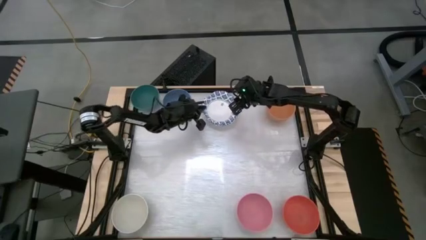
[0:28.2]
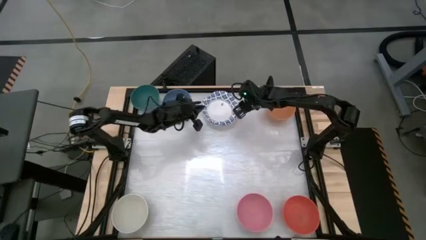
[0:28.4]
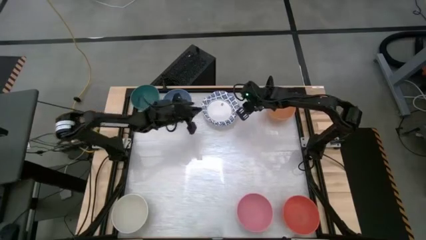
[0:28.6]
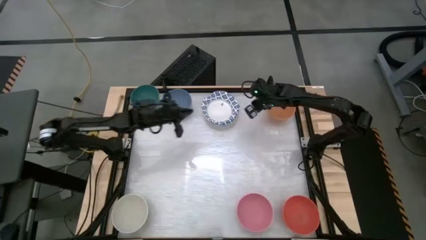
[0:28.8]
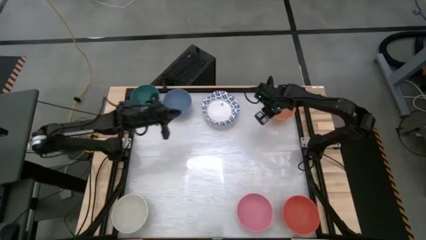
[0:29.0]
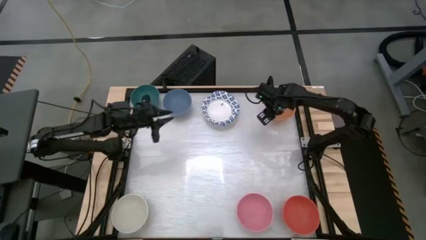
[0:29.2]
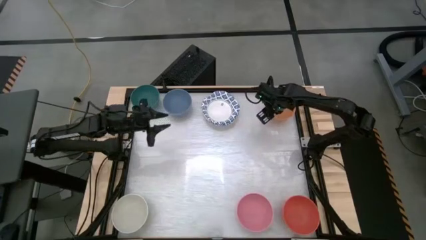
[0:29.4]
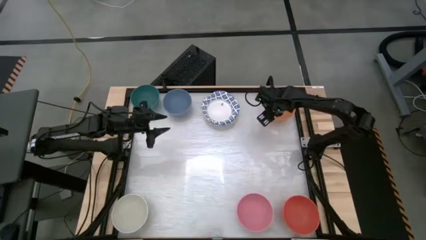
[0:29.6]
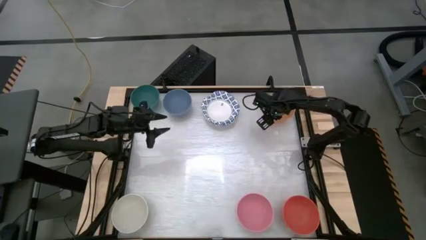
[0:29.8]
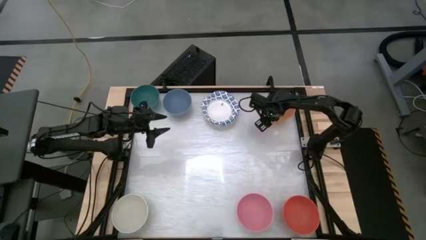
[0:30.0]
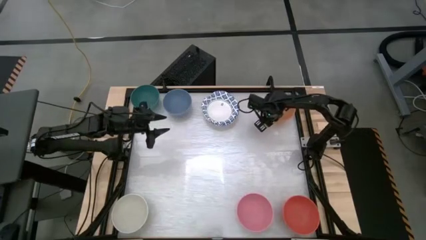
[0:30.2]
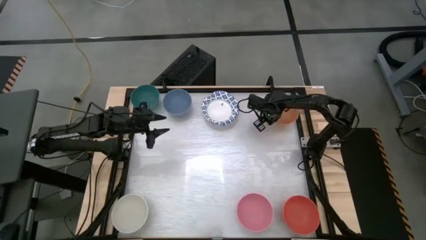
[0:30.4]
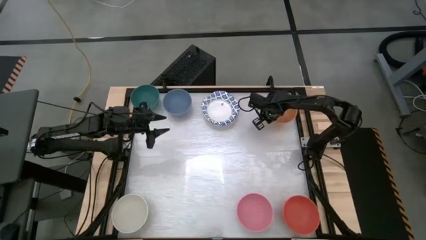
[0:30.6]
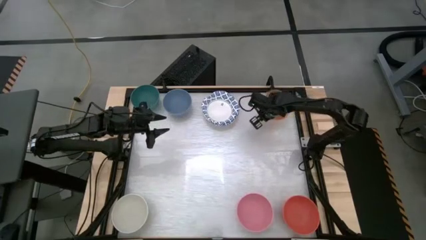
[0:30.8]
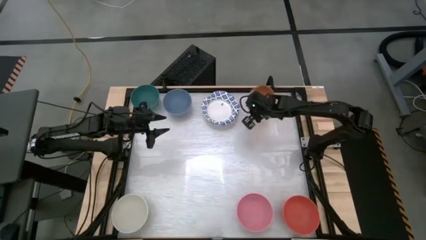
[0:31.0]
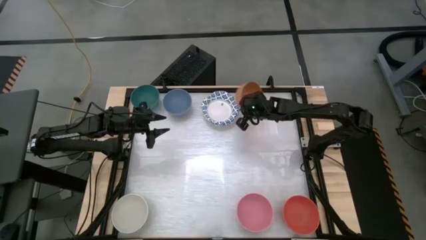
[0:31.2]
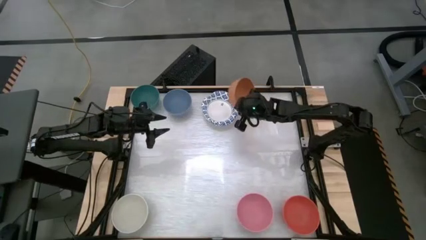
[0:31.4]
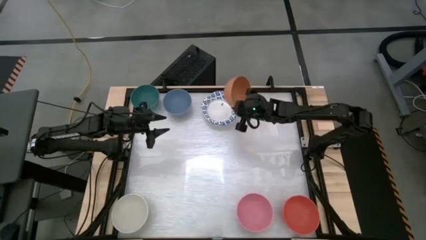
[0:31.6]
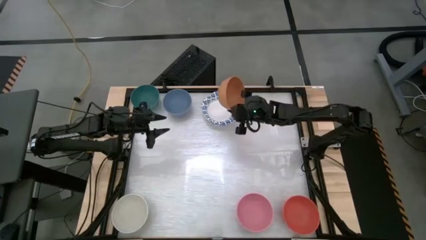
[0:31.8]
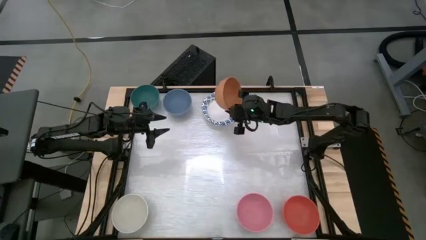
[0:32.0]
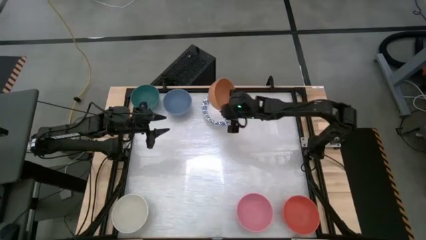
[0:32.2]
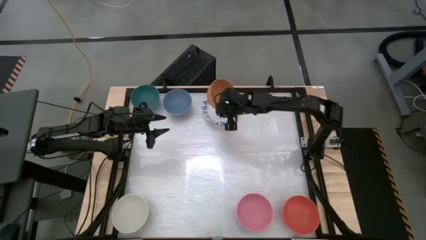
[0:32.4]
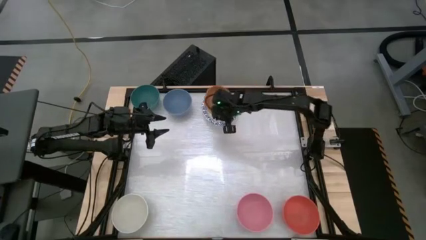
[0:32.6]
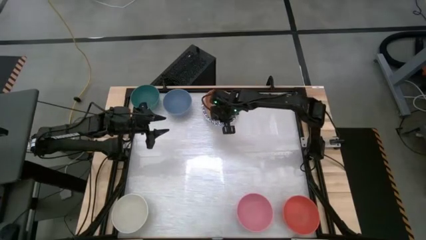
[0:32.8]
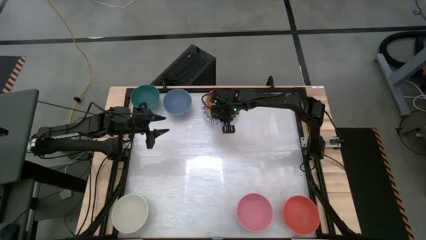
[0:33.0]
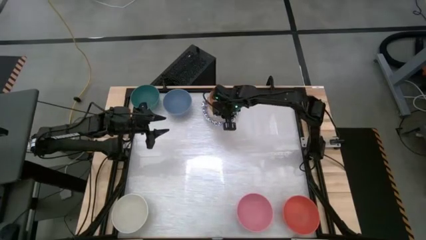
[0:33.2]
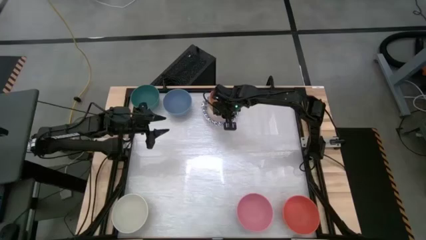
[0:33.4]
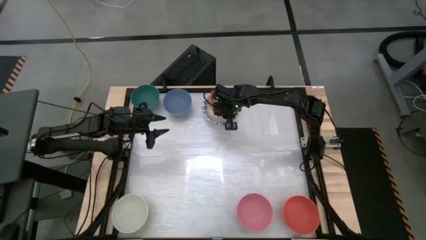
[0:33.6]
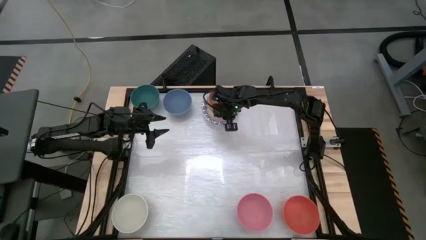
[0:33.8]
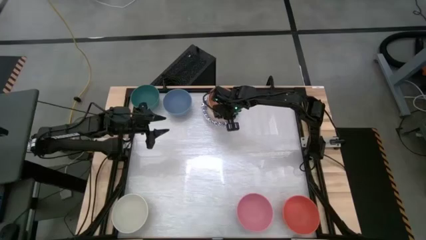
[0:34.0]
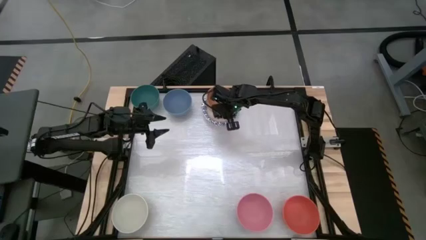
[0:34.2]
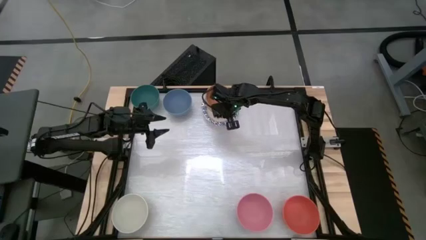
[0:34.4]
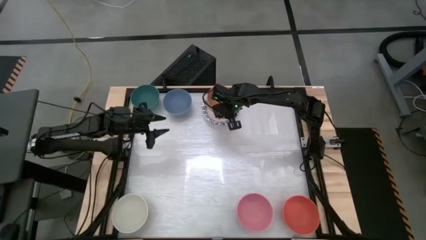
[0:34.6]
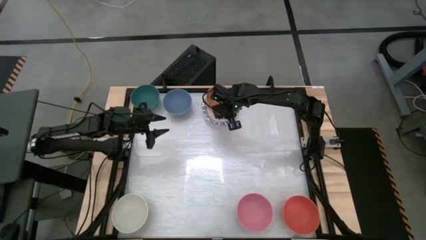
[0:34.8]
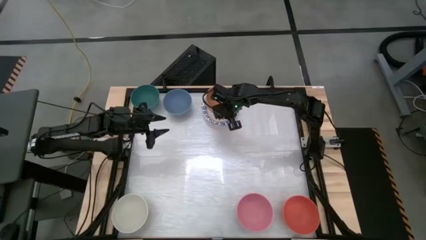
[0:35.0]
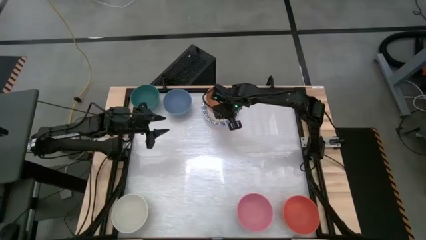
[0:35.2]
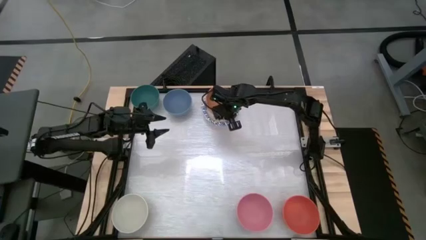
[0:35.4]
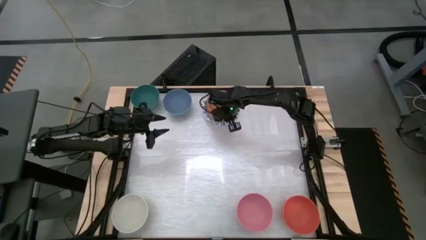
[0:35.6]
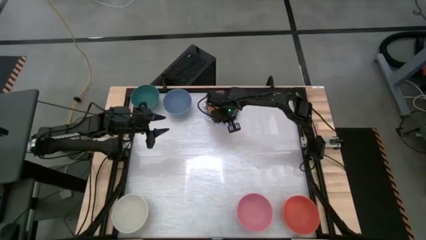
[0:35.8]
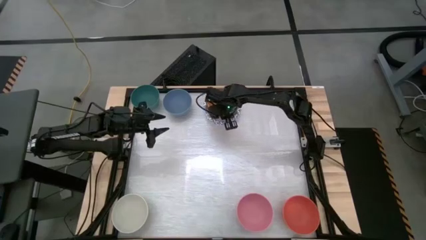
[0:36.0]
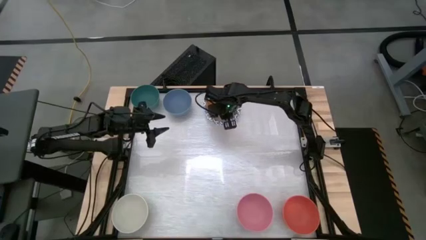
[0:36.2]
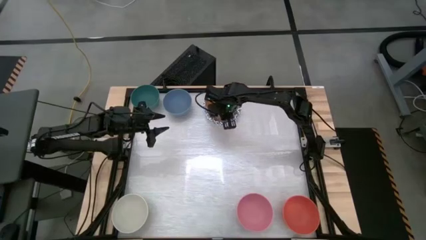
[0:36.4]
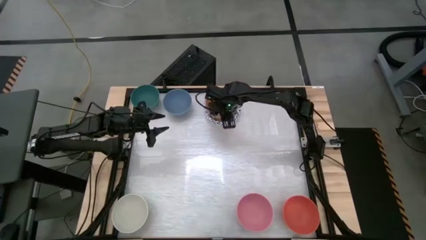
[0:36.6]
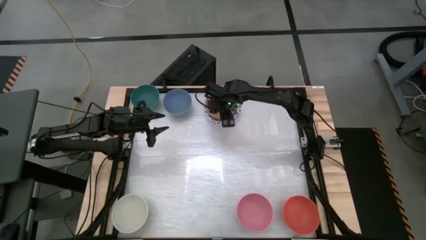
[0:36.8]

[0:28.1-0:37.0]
Stack the brown bowl on top of the blue pattern bowl

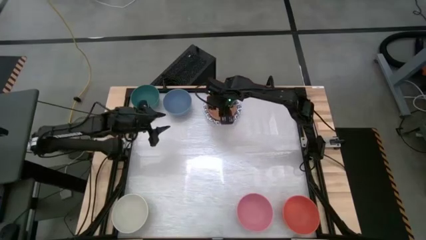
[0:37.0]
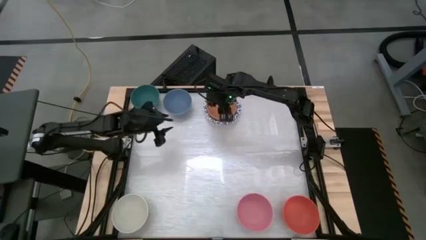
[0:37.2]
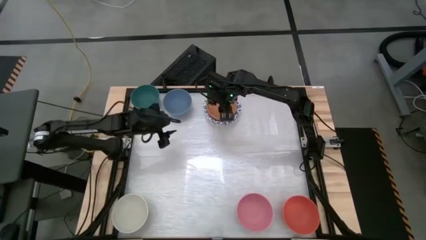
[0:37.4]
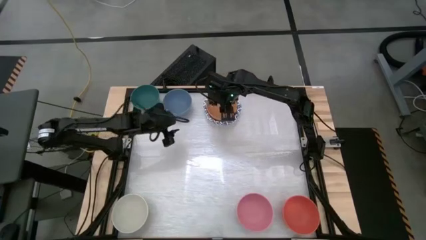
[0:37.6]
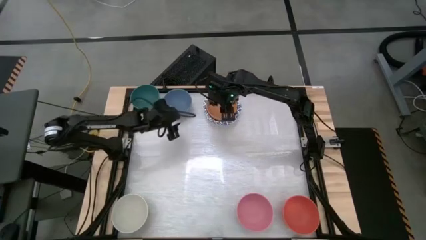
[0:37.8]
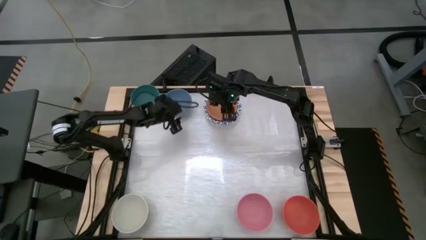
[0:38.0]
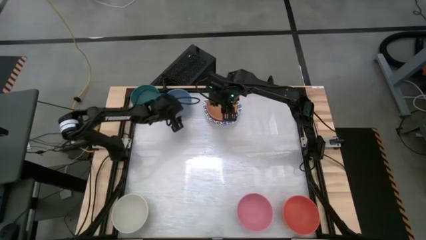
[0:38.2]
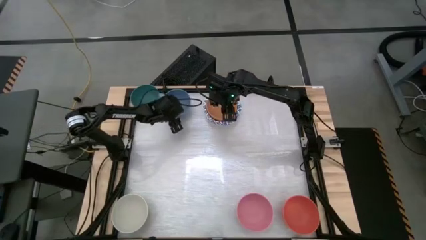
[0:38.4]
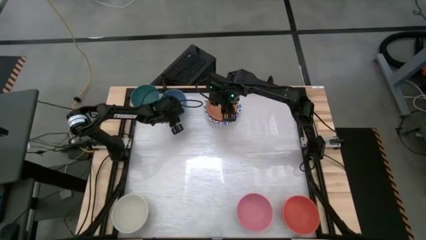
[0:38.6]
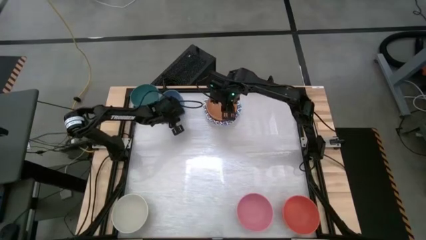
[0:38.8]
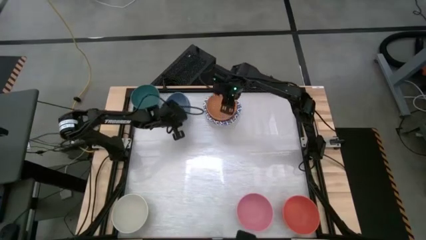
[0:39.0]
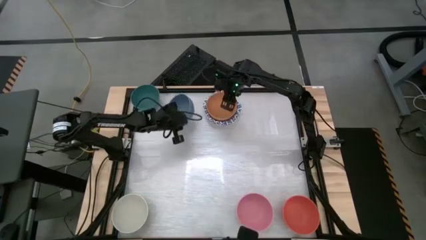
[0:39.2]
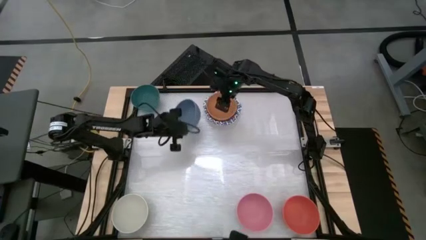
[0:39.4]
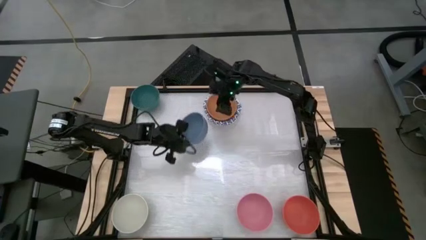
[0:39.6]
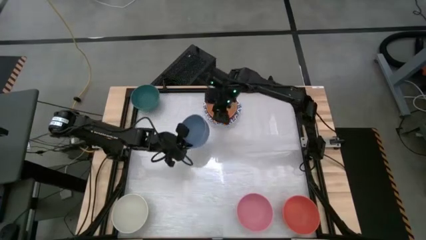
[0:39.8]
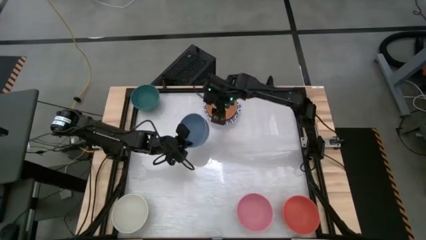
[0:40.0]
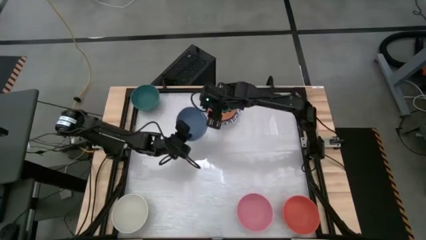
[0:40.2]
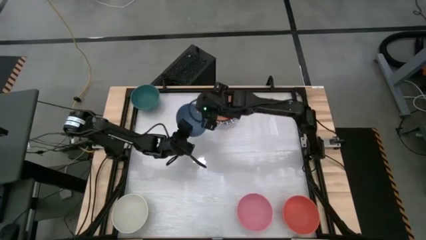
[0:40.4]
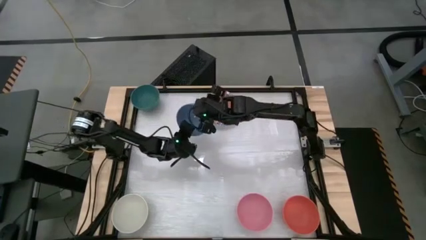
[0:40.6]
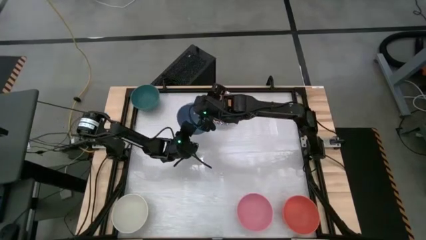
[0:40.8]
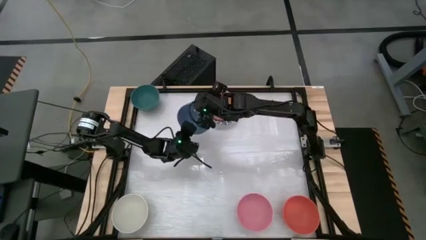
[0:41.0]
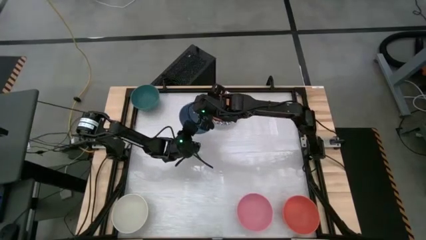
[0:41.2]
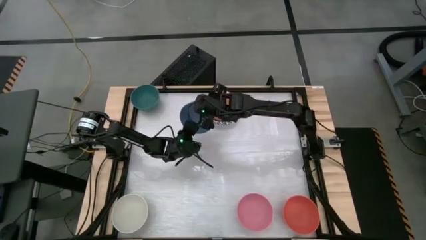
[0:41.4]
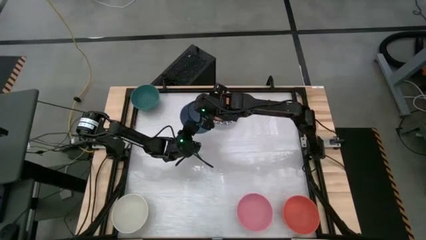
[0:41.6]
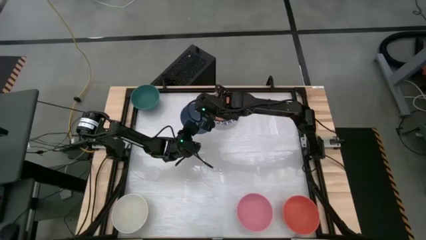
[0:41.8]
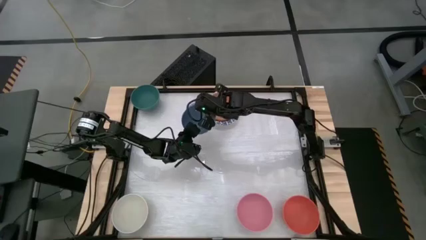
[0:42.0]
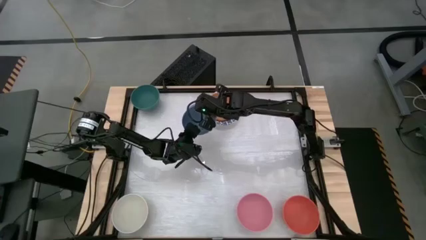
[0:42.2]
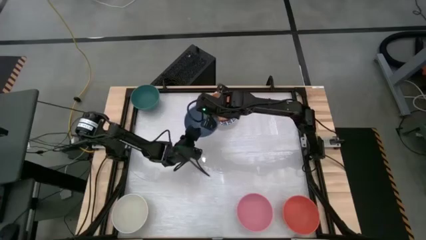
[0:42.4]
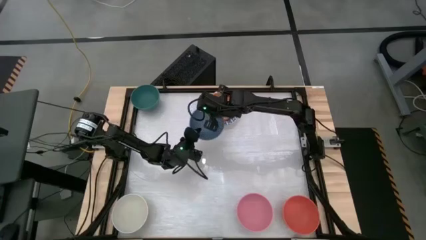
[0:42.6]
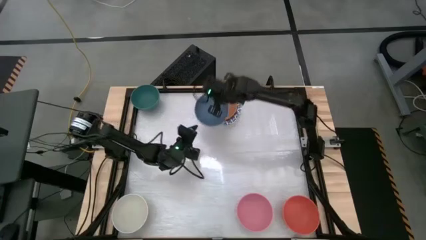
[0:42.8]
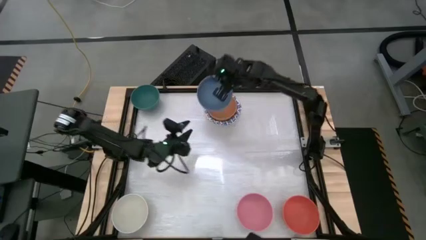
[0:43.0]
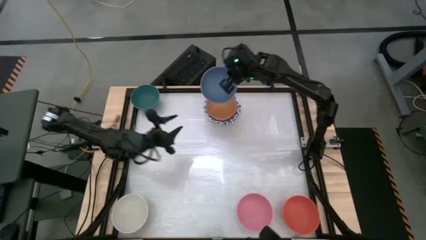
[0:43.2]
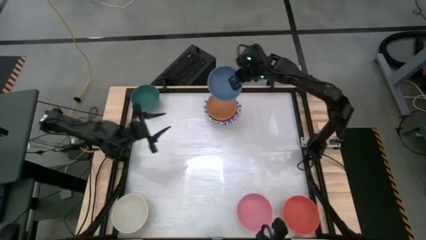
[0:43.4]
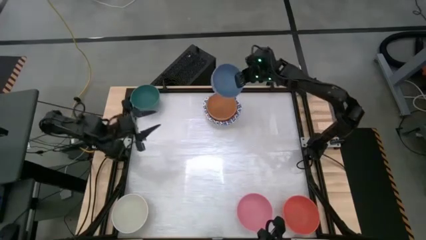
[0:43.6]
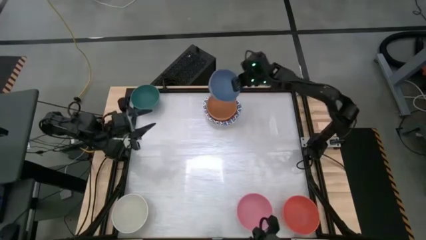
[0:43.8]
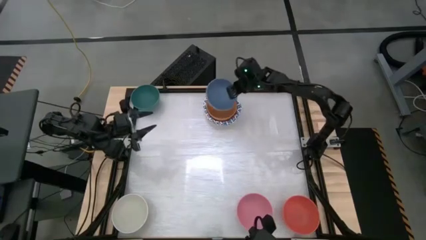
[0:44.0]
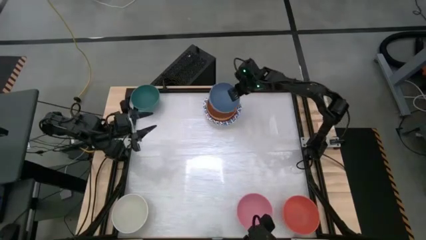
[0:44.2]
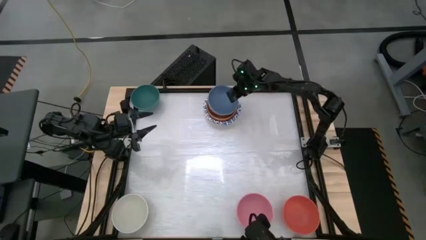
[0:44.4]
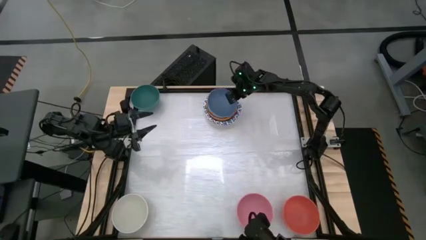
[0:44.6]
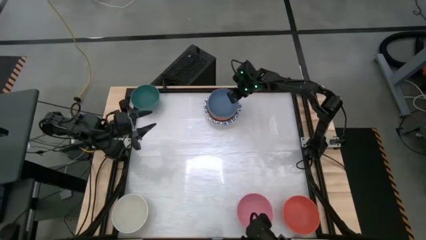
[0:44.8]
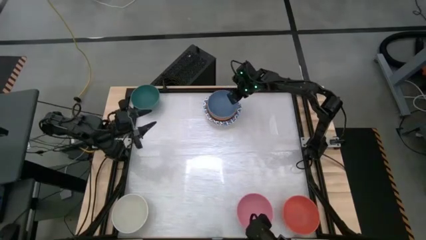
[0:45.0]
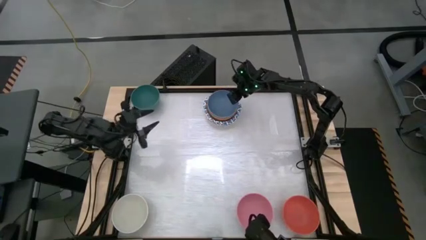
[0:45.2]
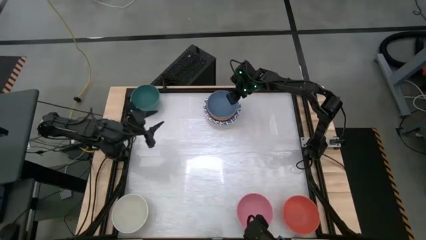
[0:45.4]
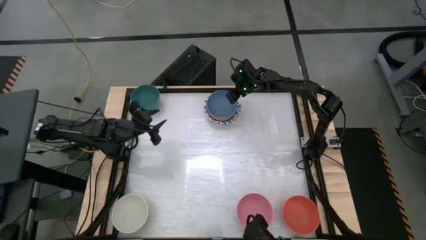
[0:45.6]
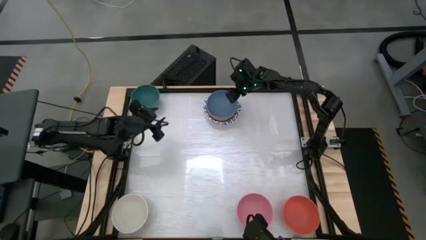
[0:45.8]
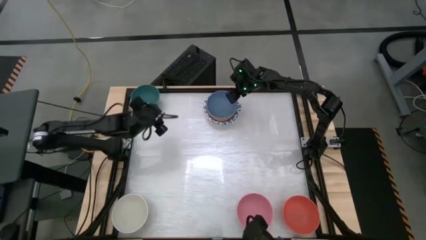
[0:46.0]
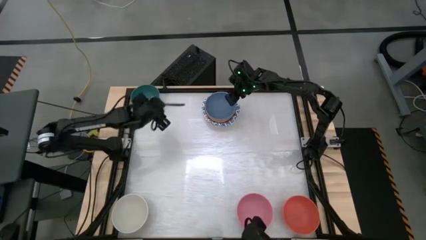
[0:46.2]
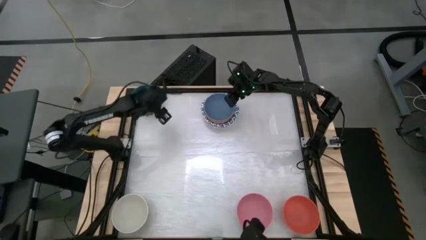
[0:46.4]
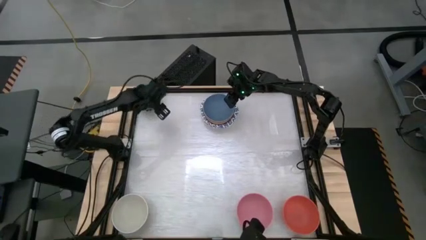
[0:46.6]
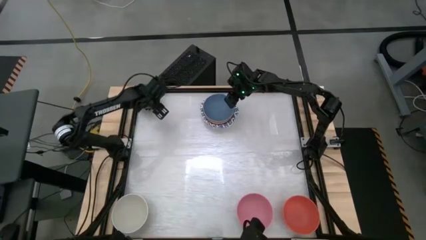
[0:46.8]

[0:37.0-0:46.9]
Stack the blue bowl on top of the brown bowl
